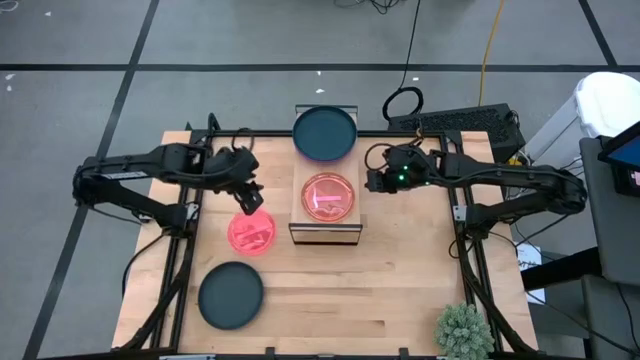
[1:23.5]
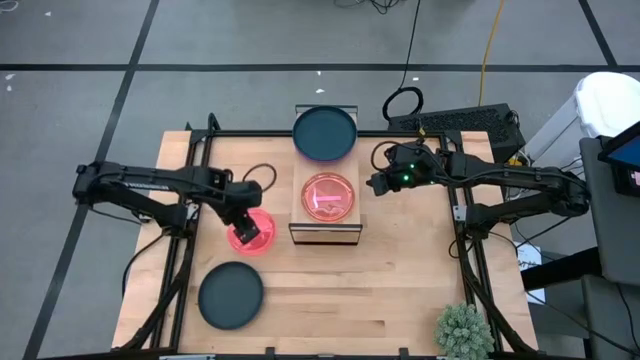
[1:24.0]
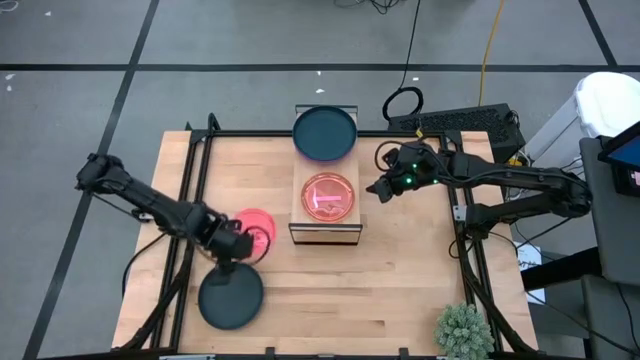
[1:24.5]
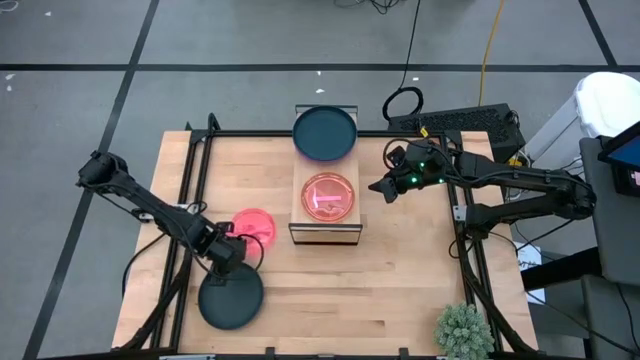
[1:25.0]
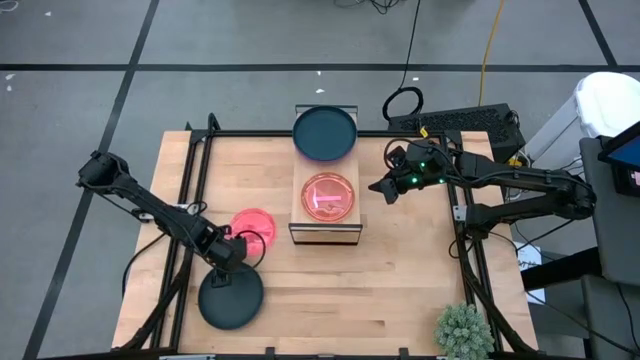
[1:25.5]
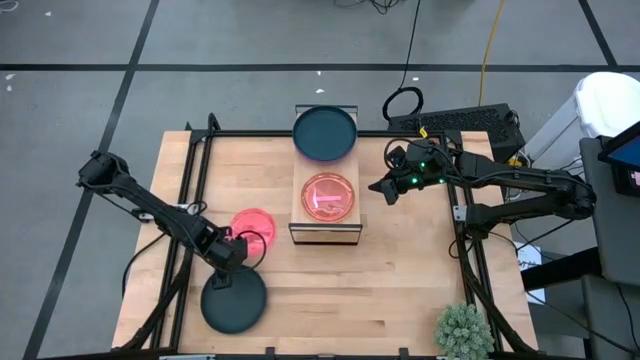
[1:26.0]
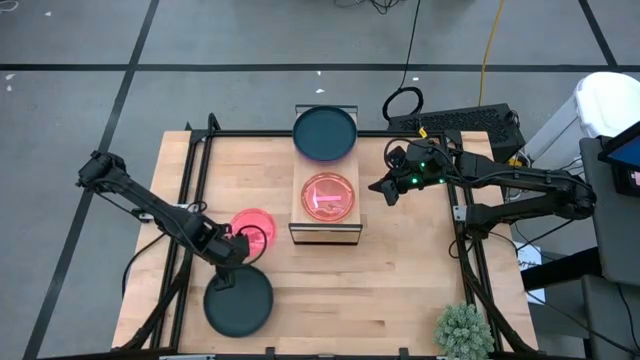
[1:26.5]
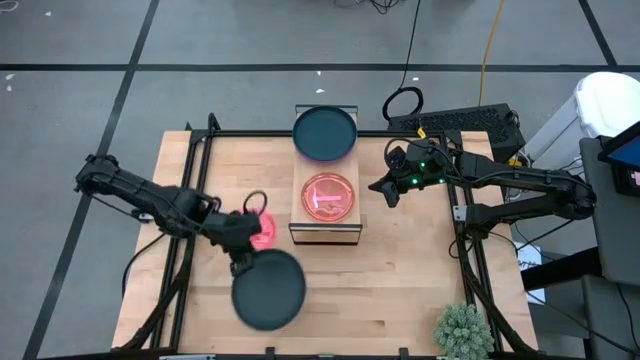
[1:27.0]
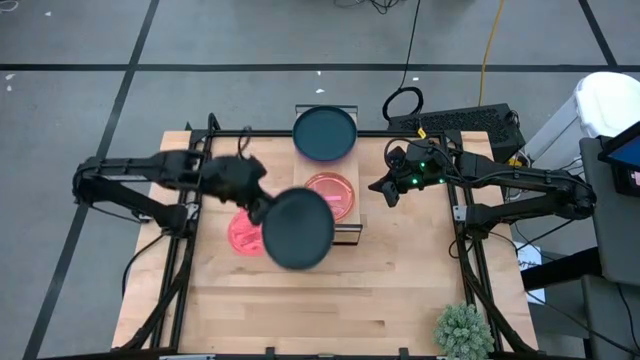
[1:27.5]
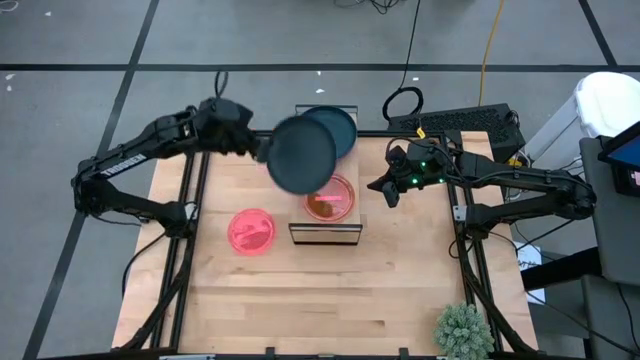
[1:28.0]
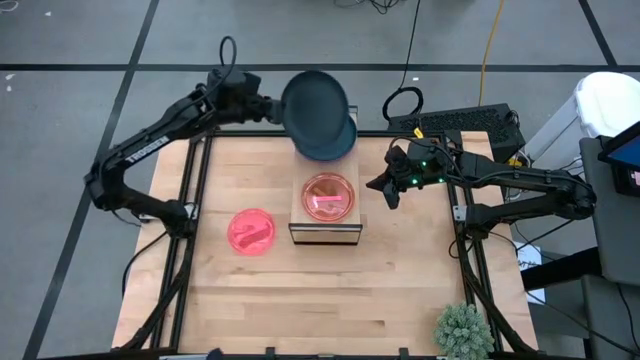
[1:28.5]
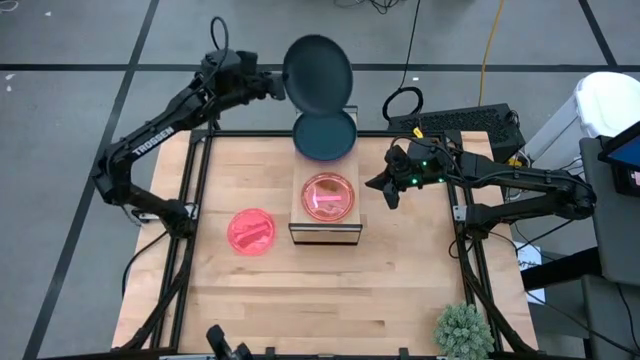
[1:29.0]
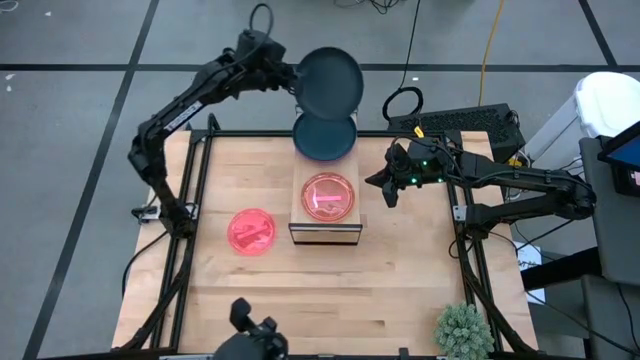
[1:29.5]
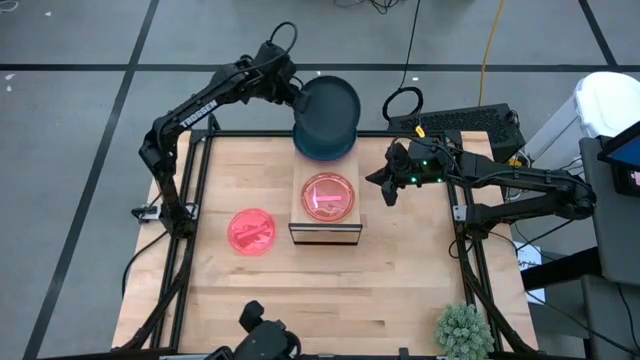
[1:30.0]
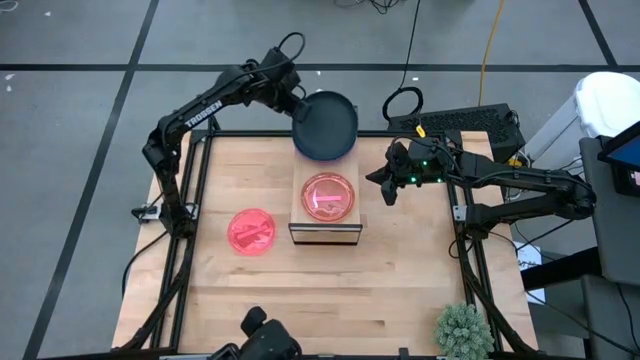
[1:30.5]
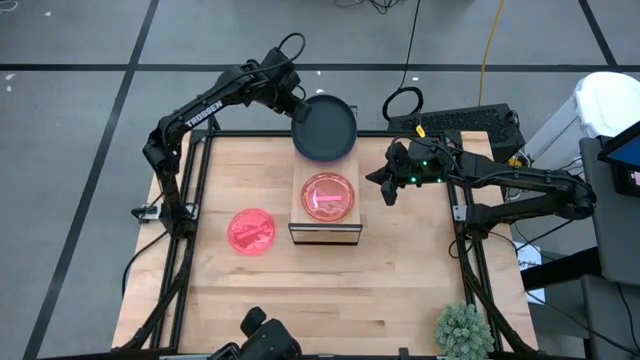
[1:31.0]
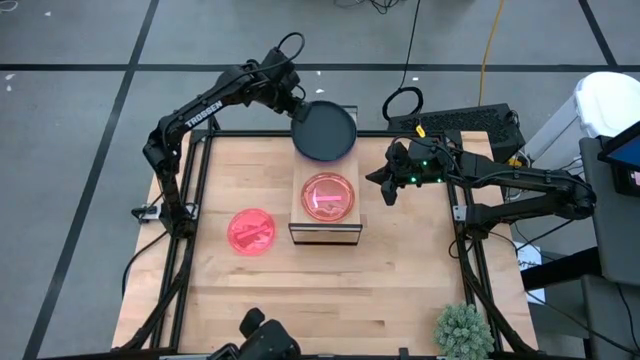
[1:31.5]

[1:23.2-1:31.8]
Task: Place and stack plates onto a shelf
Stack the dark green plate on top of the other green plate on the shelf

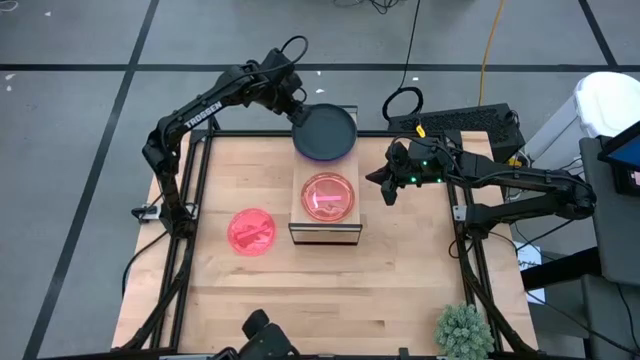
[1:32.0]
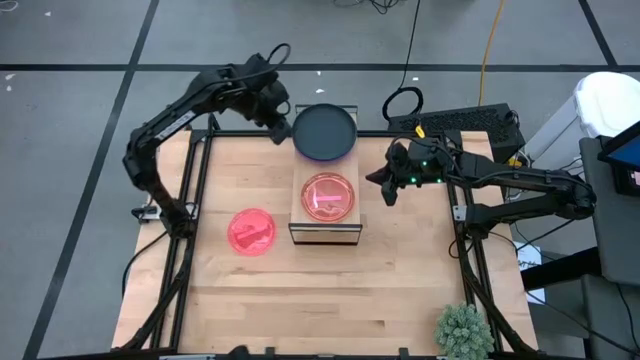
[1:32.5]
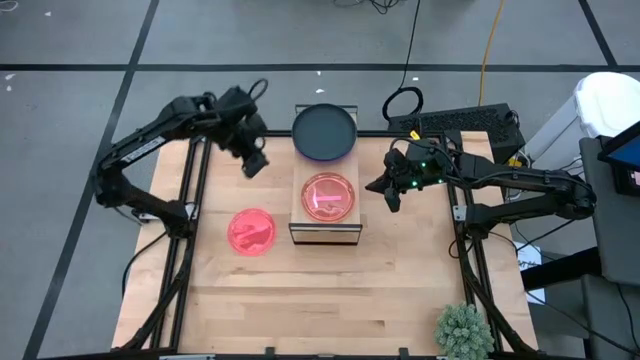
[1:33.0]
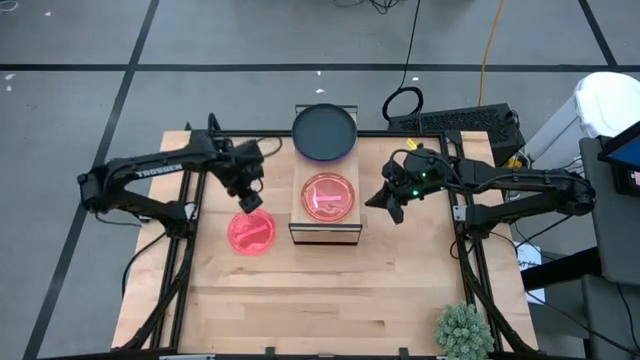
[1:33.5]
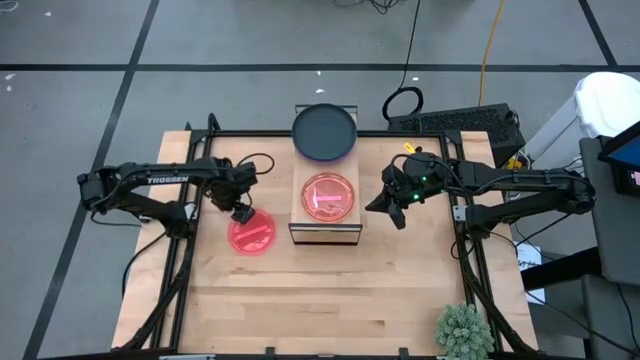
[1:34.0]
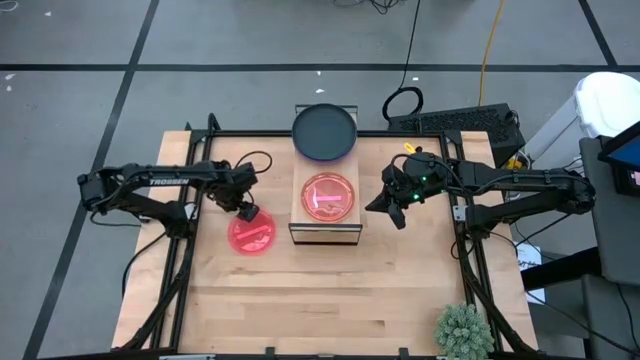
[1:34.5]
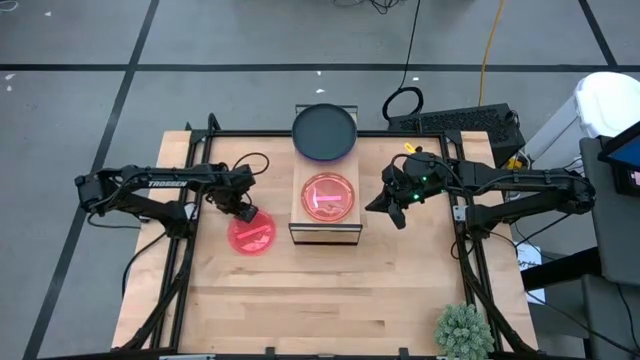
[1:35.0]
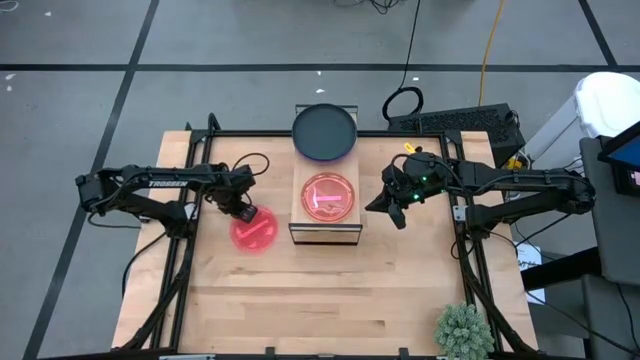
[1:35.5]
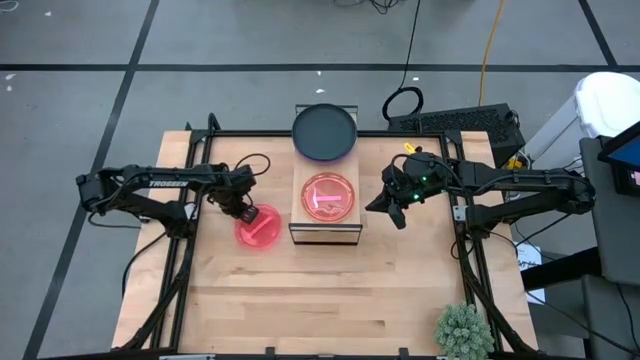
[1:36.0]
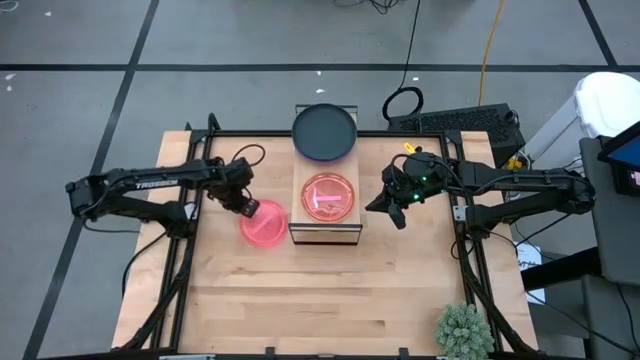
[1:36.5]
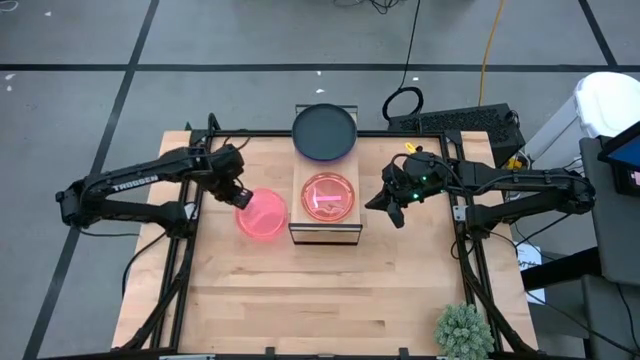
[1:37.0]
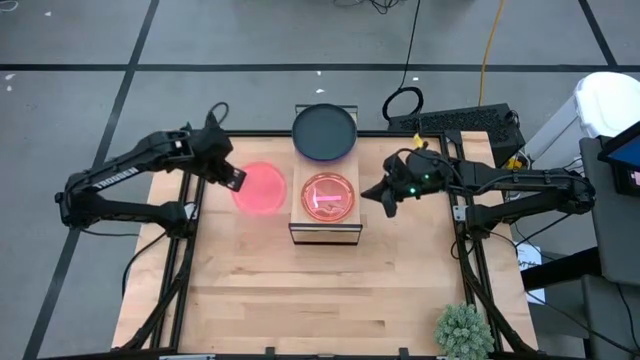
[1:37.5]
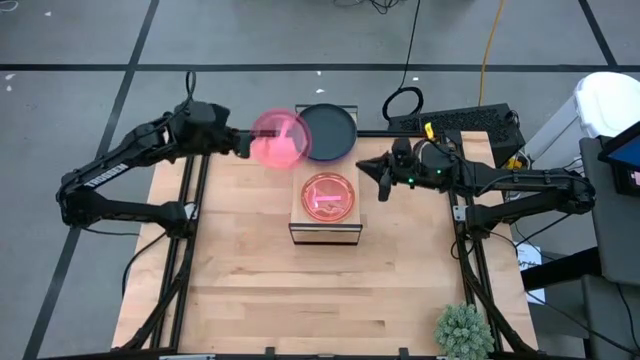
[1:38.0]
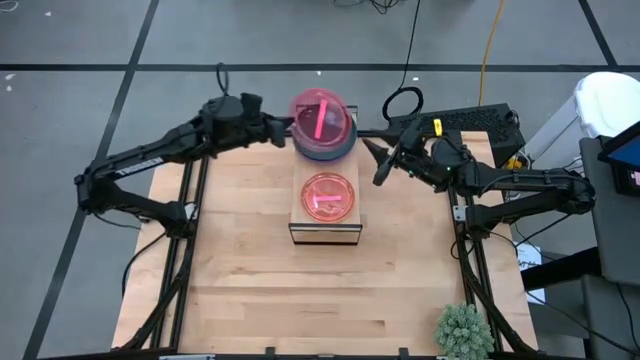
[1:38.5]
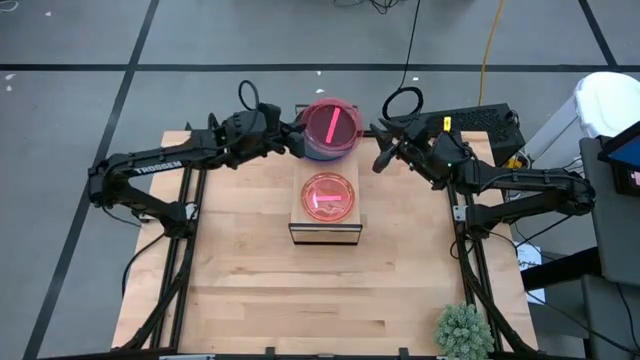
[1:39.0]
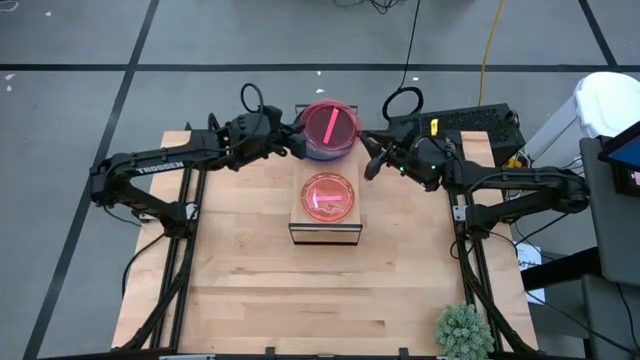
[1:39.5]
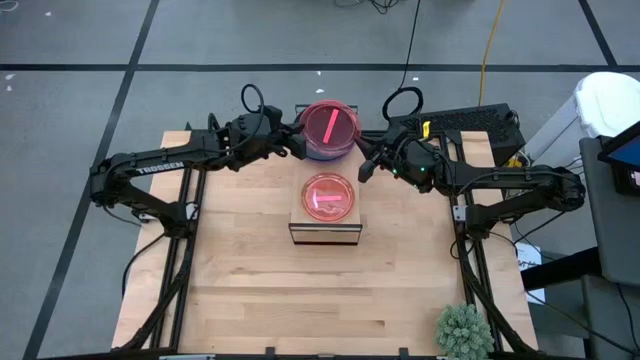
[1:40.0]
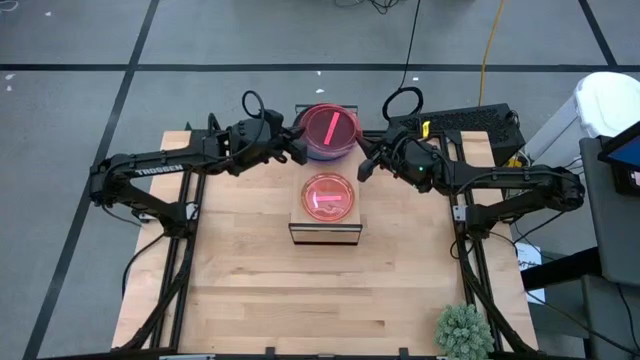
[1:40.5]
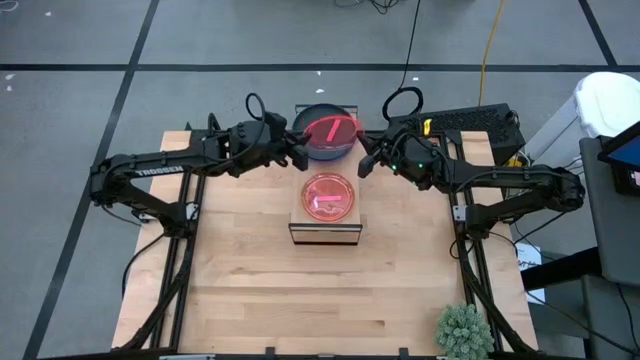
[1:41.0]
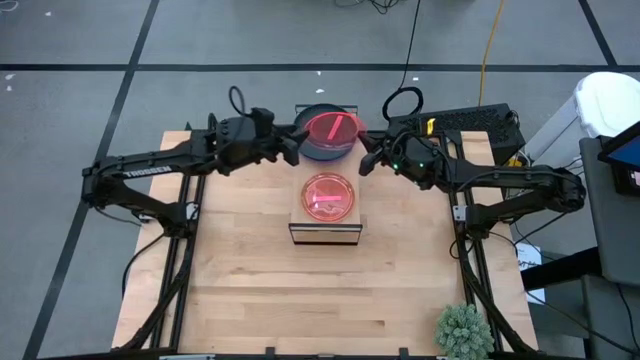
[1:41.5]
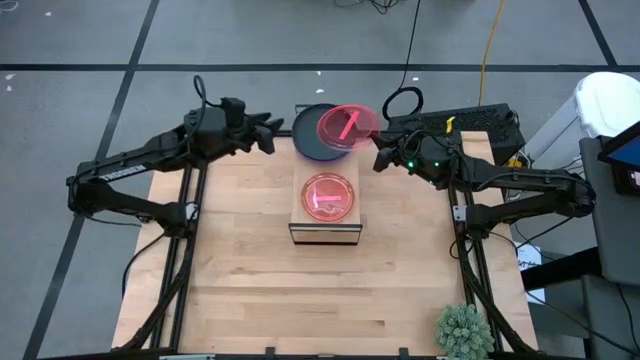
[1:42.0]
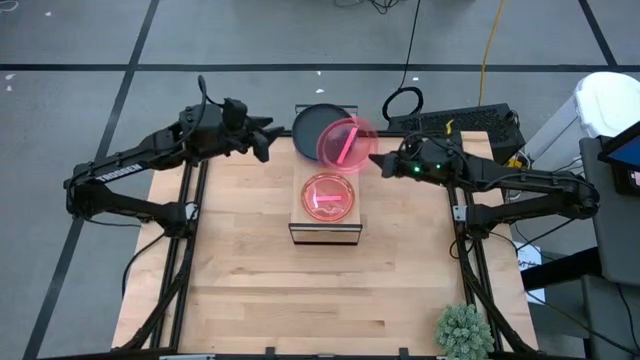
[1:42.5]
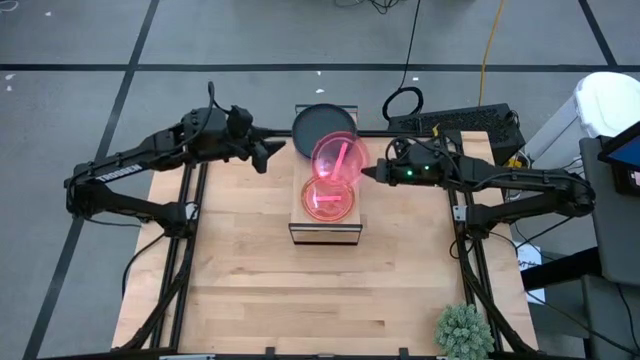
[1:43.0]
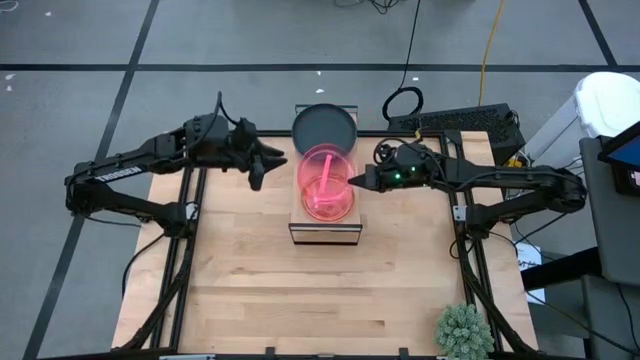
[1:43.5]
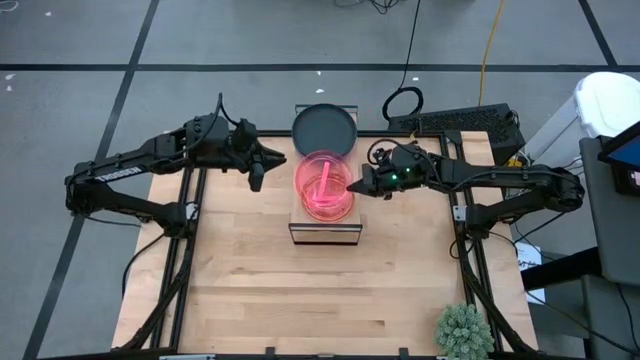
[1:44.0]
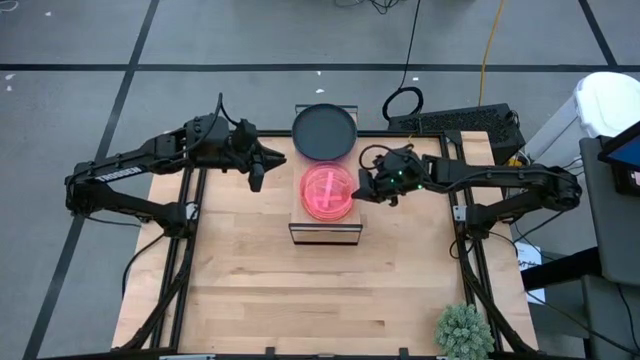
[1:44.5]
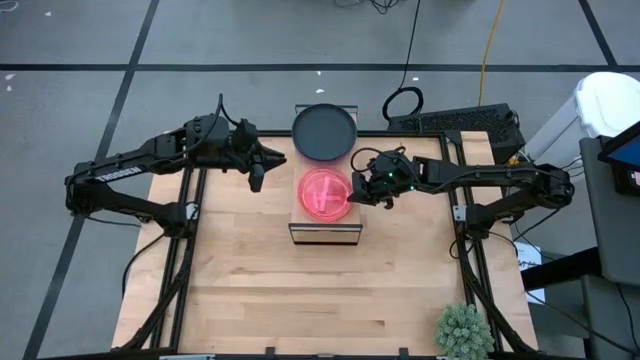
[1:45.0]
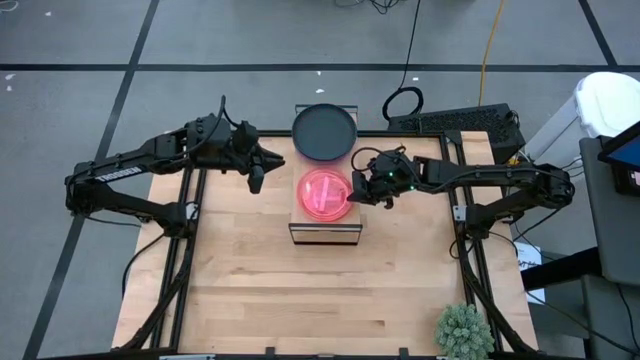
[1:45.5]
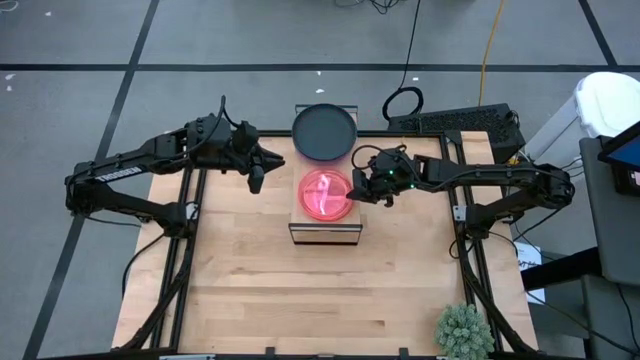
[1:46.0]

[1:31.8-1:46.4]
Stack the pink plate on top of the other pink plate on the shelf
